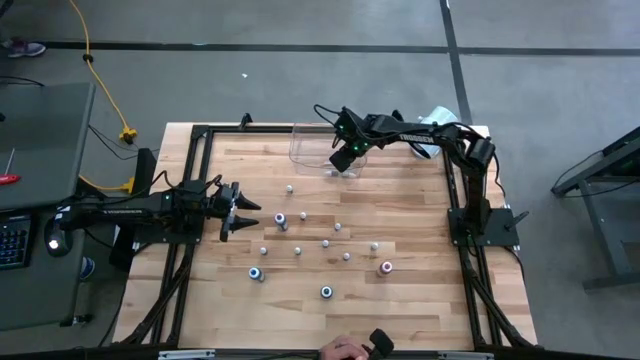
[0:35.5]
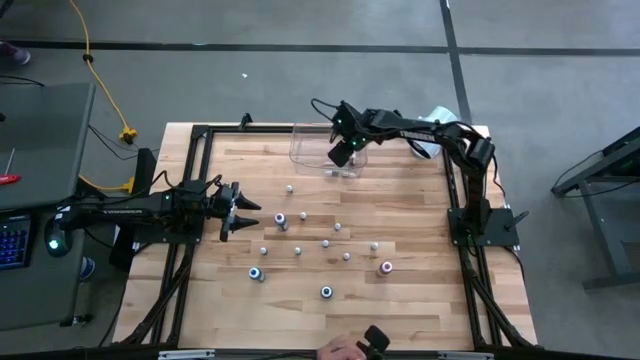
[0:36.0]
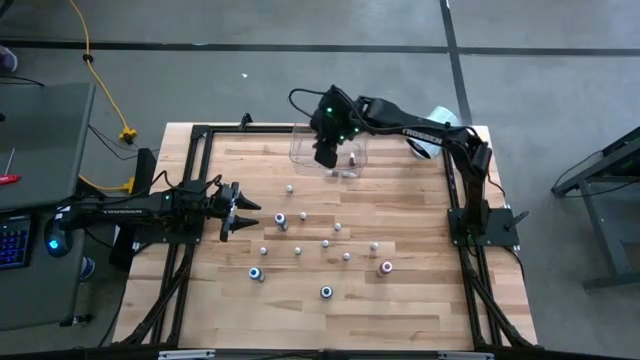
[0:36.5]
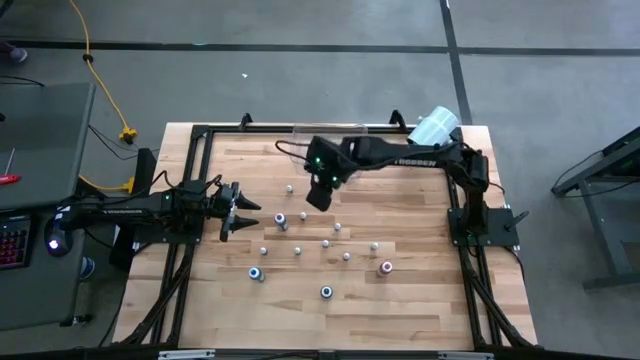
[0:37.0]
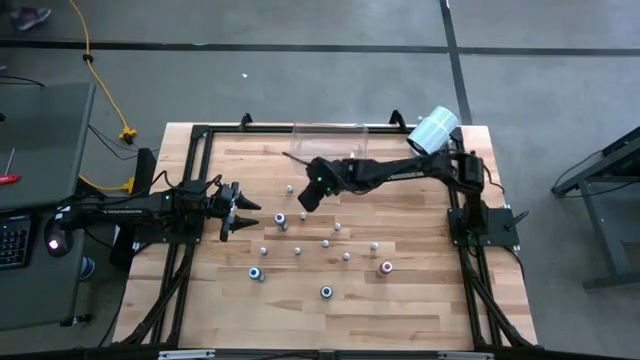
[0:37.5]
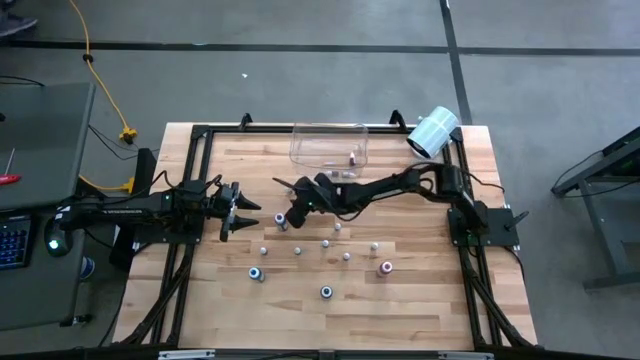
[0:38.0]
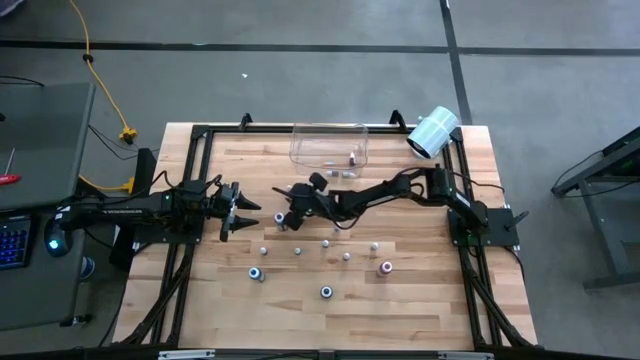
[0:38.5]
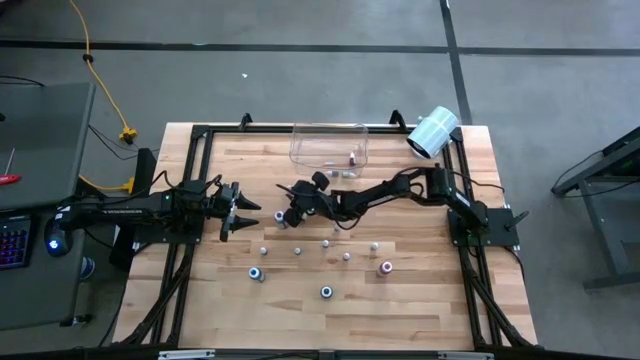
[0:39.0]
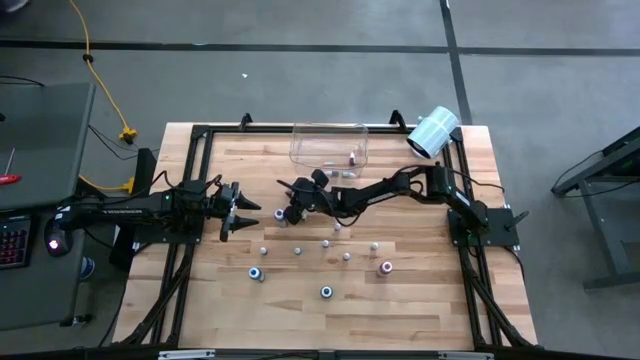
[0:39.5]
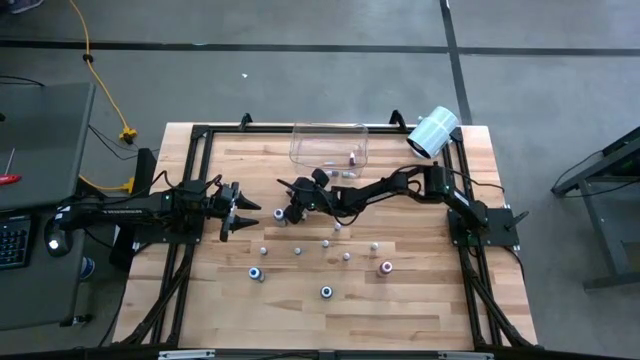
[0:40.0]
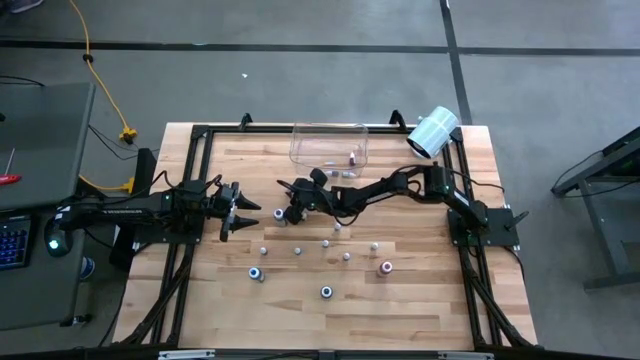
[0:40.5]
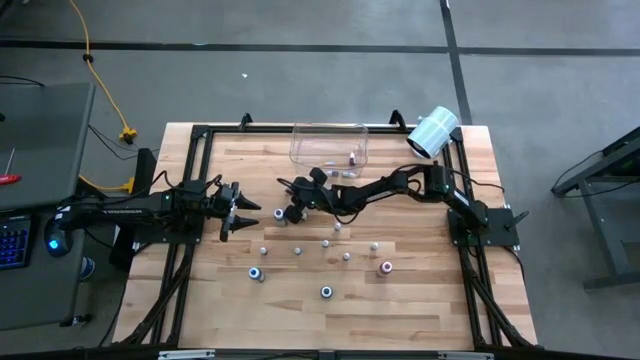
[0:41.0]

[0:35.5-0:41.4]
Task: Pick & Place food coloring
Put the small green food coloring into the transparent container

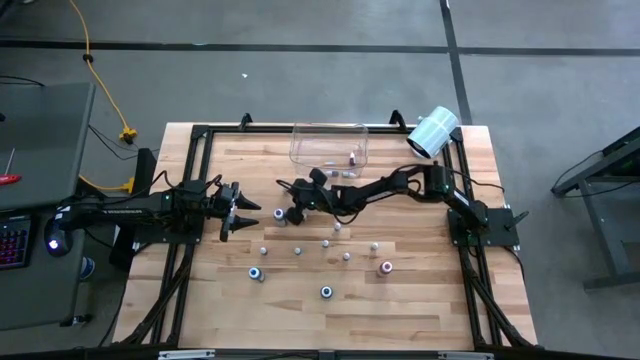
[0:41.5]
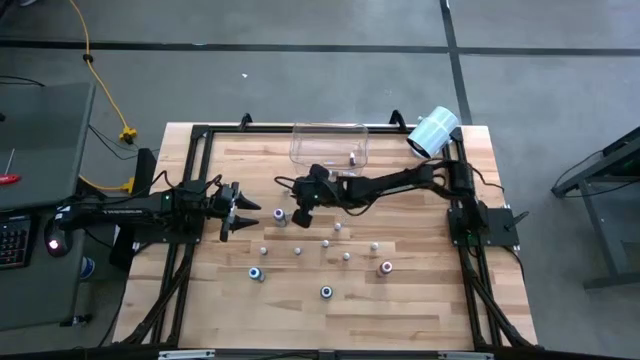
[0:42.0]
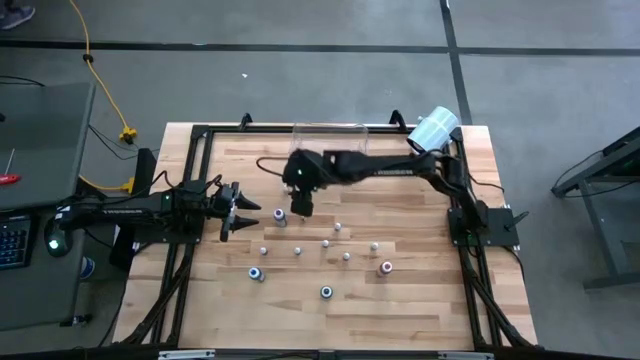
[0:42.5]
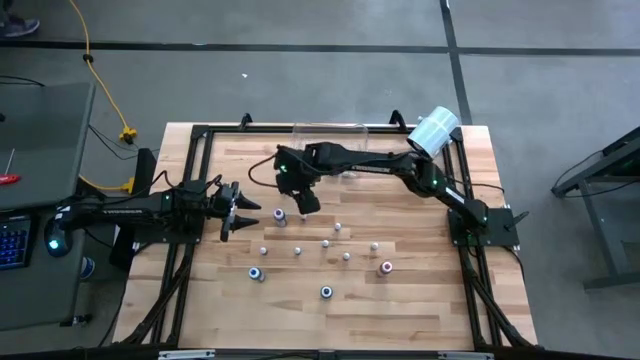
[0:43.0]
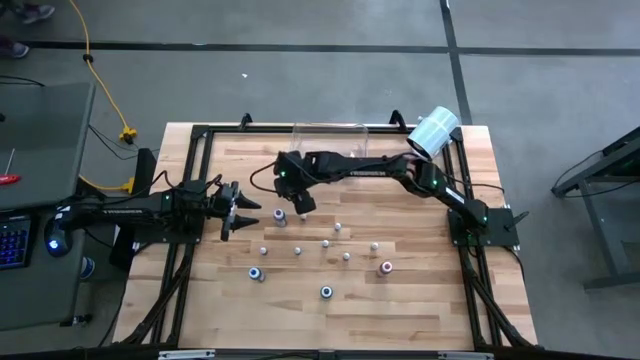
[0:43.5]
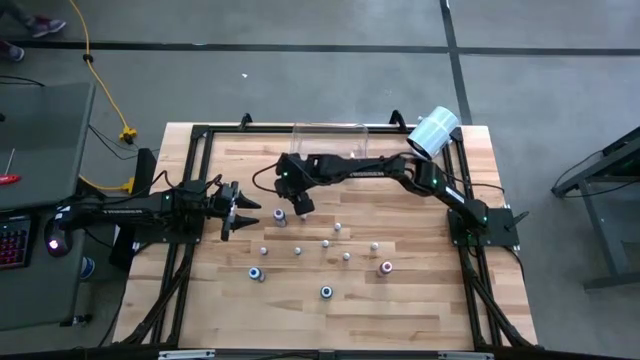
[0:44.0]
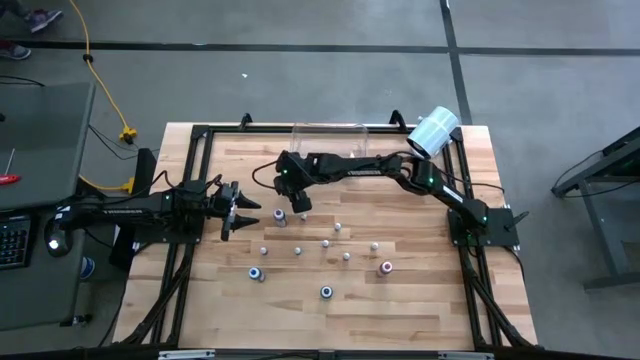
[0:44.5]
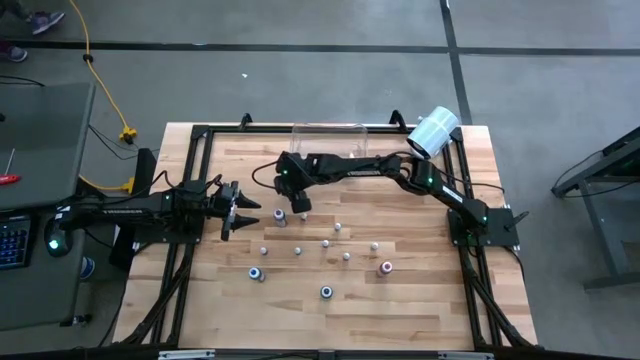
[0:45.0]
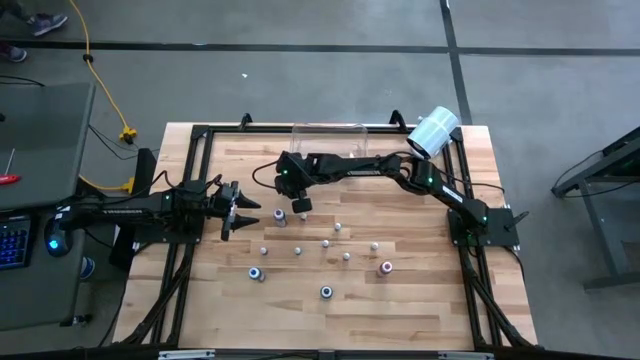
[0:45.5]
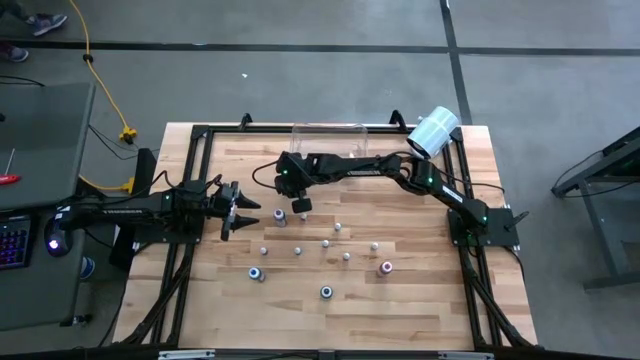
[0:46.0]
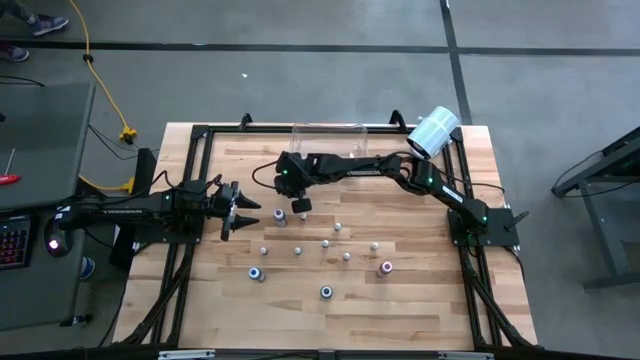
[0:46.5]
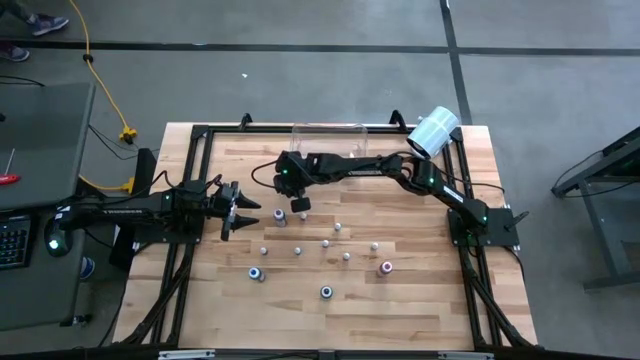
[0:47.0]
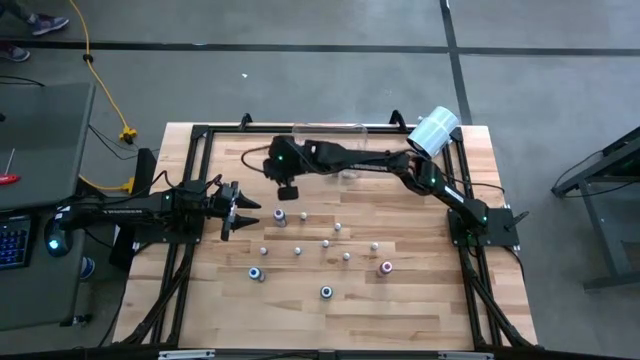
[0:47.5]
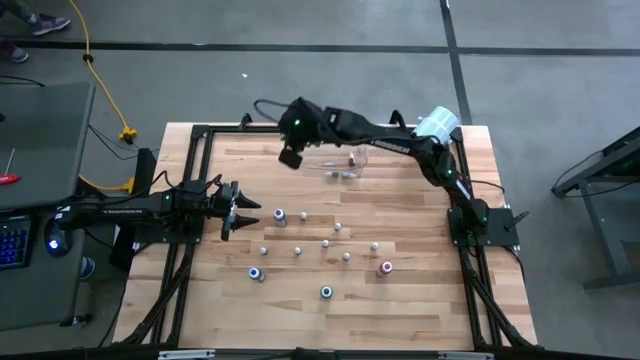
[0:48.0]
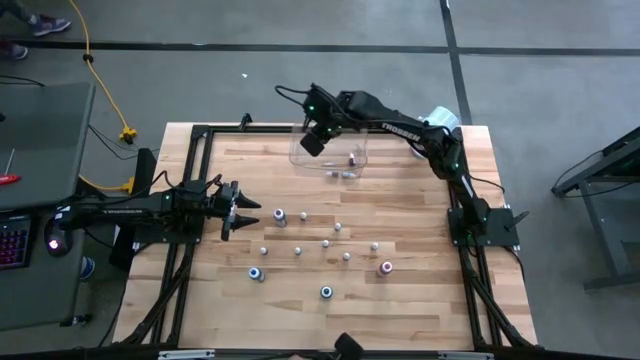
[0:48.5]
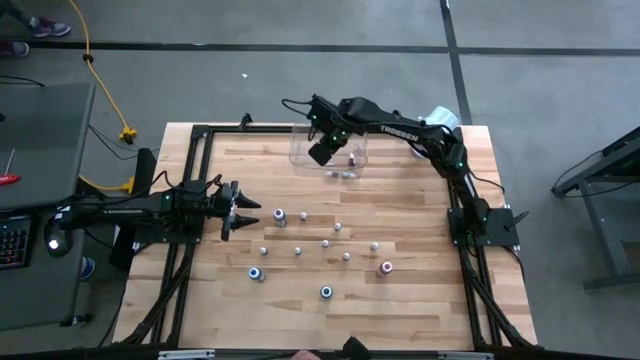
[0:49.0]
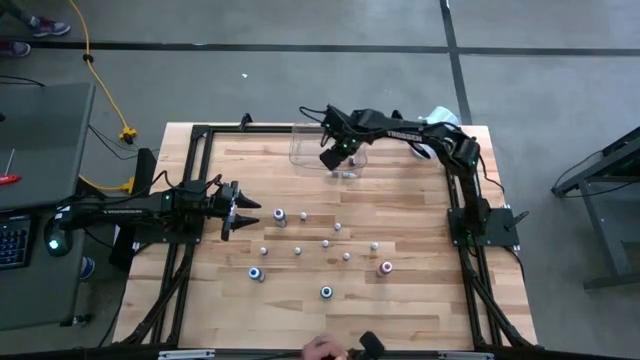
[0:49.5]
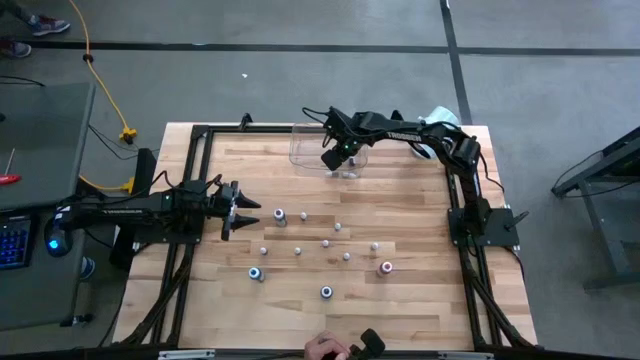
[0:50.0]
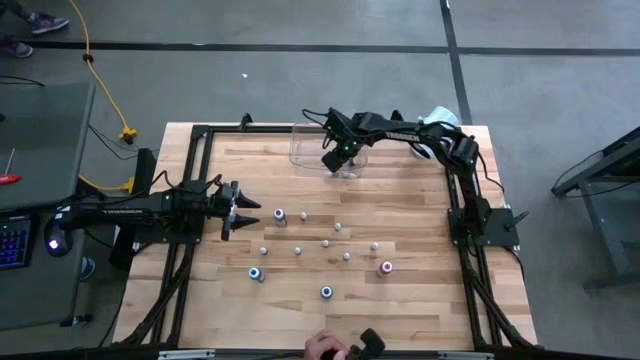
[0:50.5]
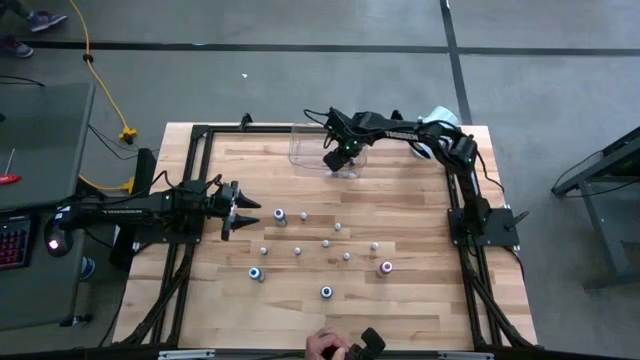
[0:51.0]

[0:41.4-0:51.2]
Put the small green food coloring into the transparent container

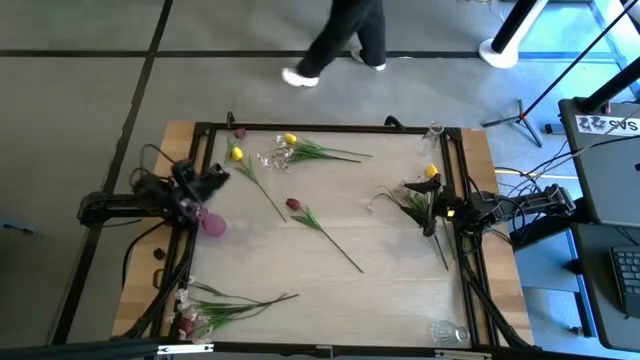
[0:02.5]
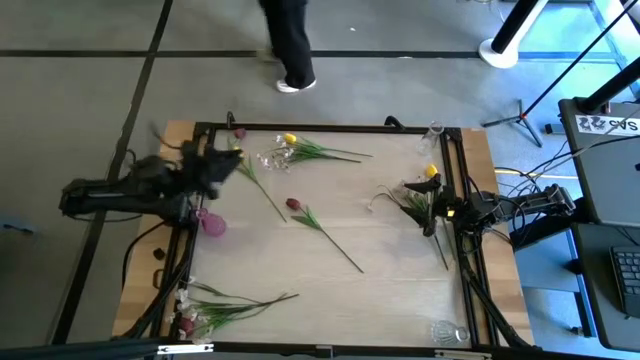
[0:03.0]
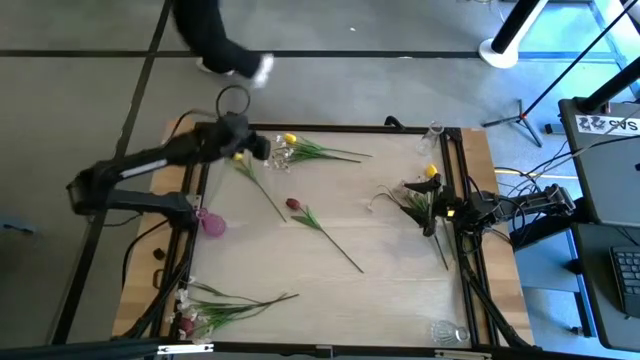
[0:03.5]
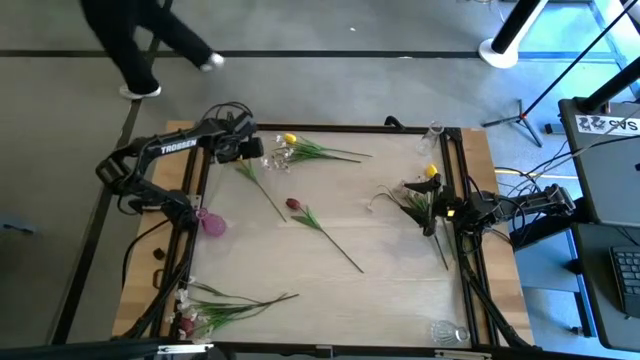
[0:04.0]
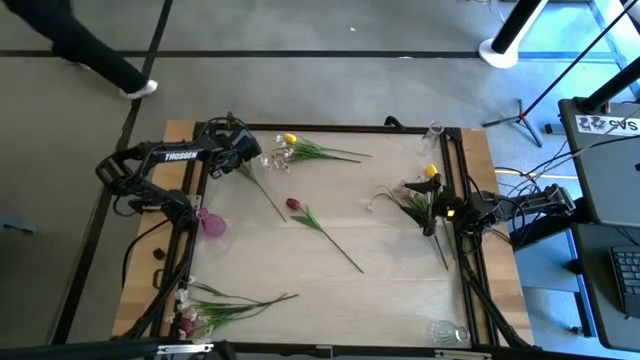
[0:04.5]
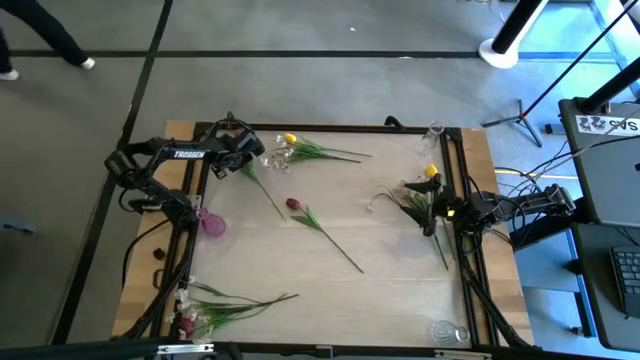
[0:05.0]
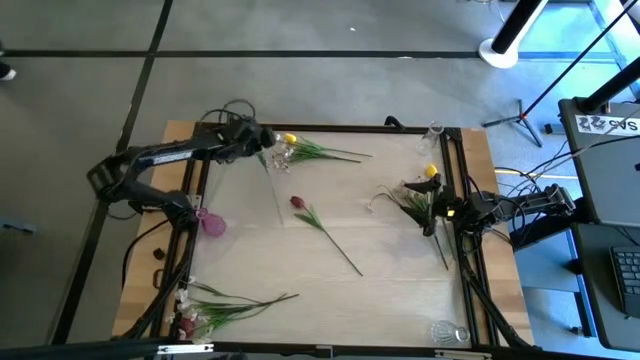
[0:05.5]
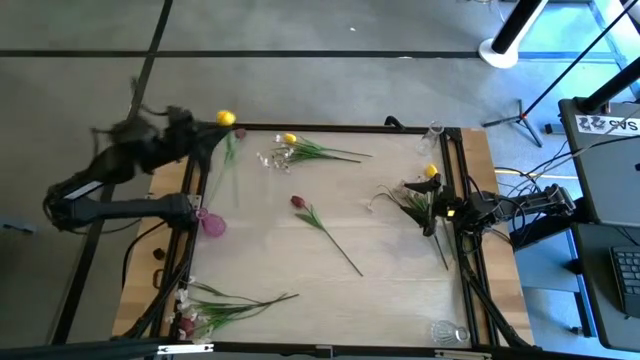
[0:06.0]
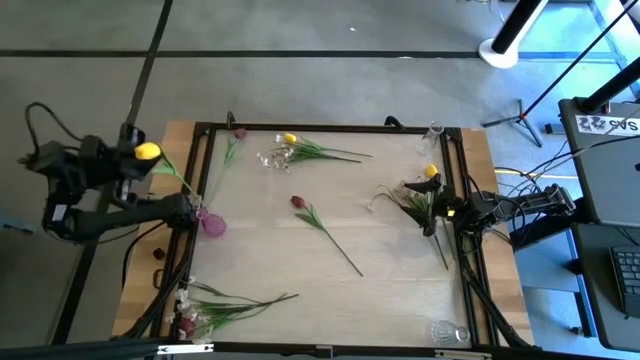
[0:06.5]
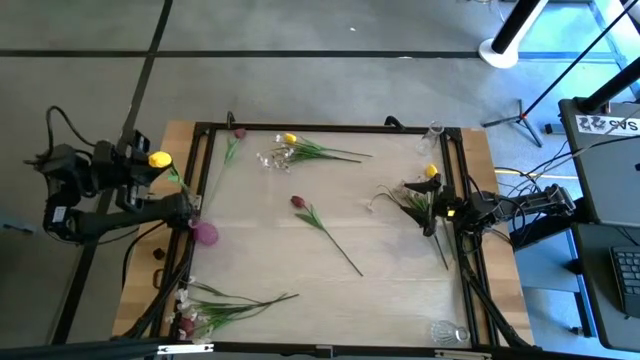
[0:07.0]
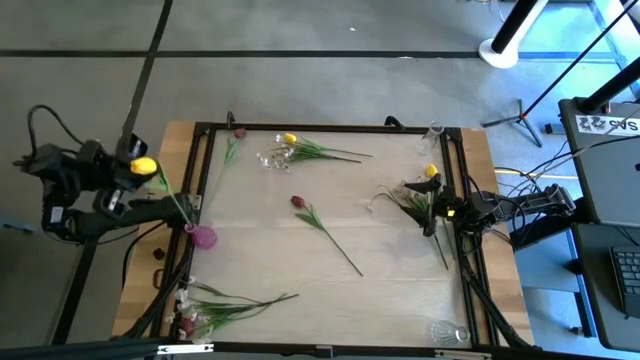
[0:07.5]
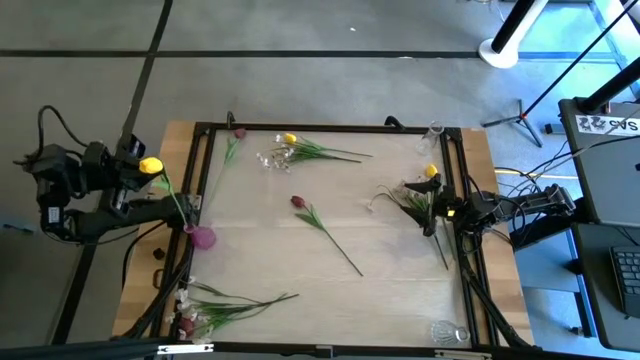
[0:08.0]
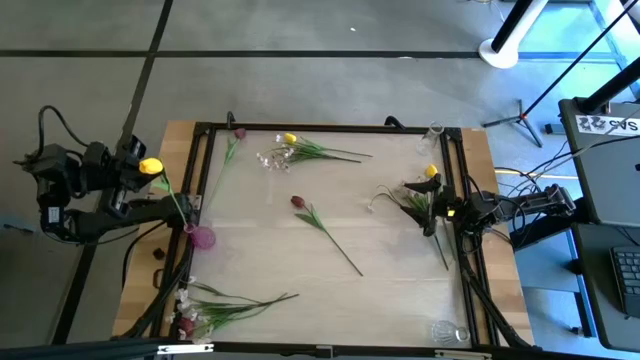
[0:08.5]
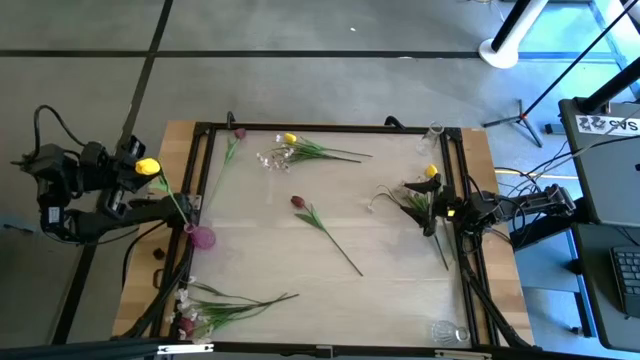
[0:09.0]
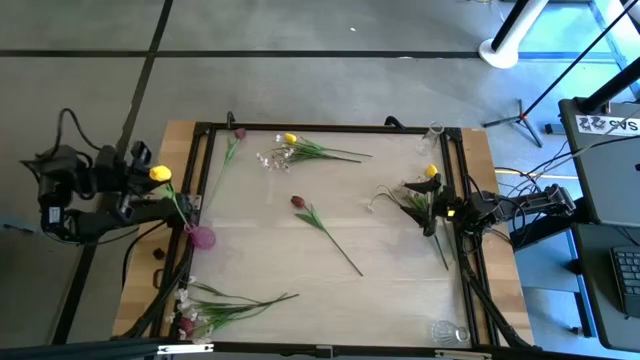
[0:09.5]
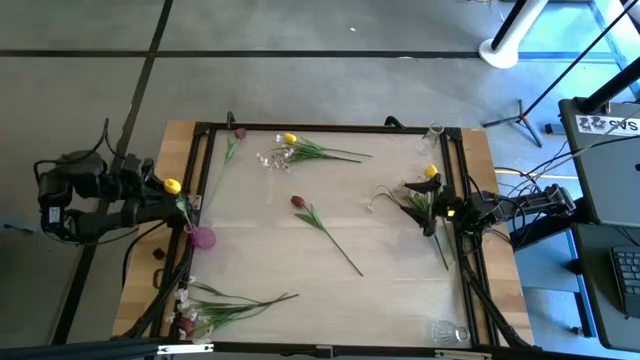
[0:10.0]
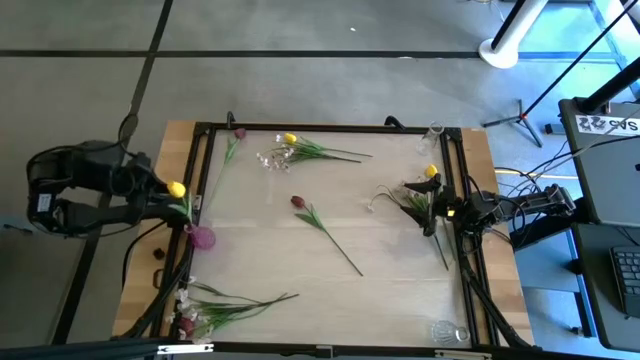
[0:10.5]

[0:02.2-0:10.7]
Task: Sort flowers into vase by color
Put the top left yellow tulip into the purple flower vase
